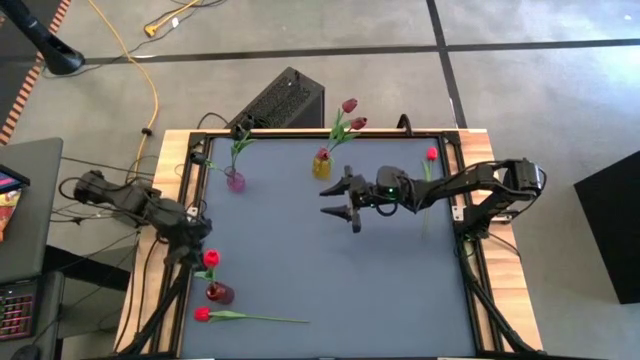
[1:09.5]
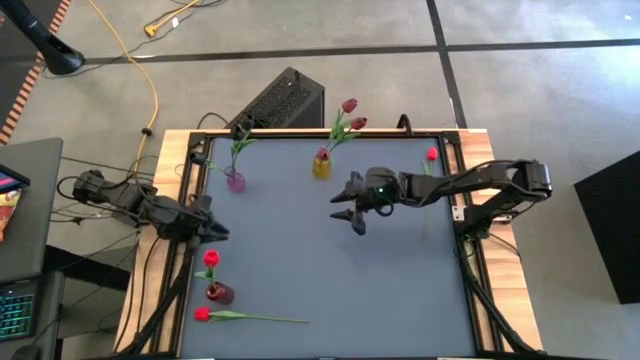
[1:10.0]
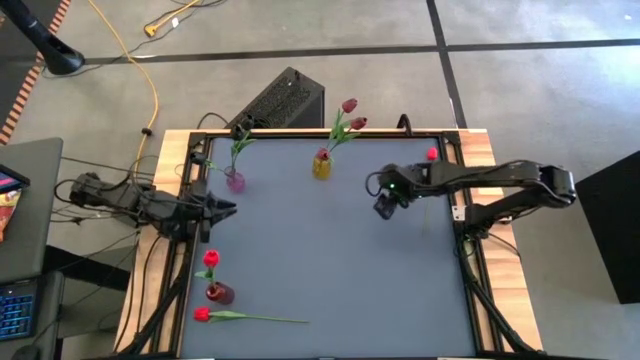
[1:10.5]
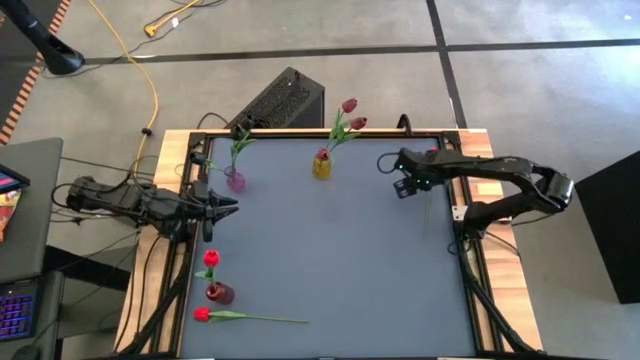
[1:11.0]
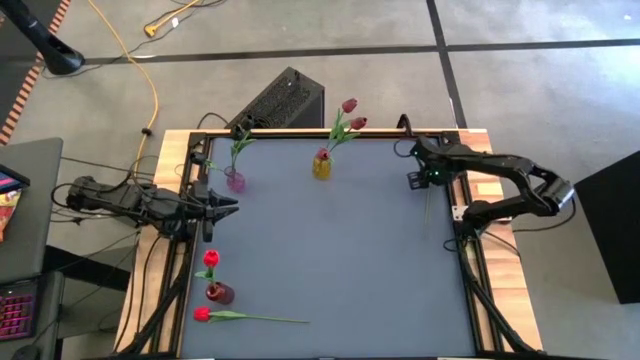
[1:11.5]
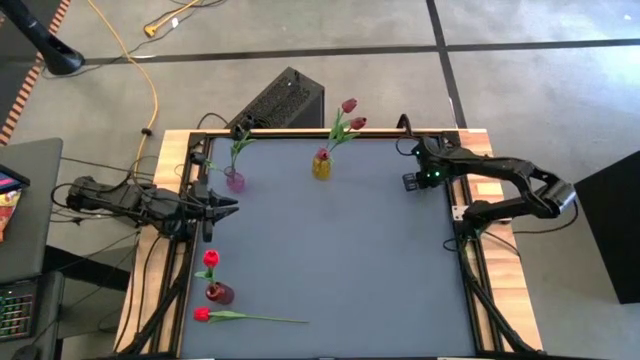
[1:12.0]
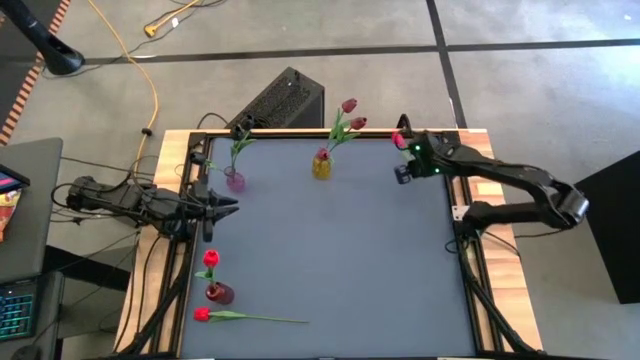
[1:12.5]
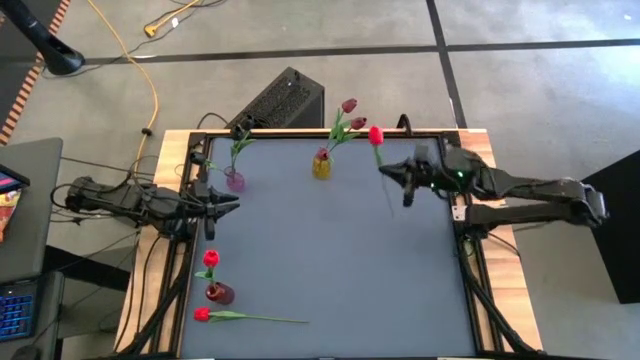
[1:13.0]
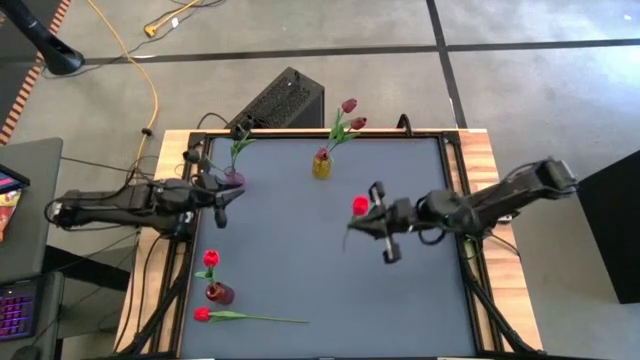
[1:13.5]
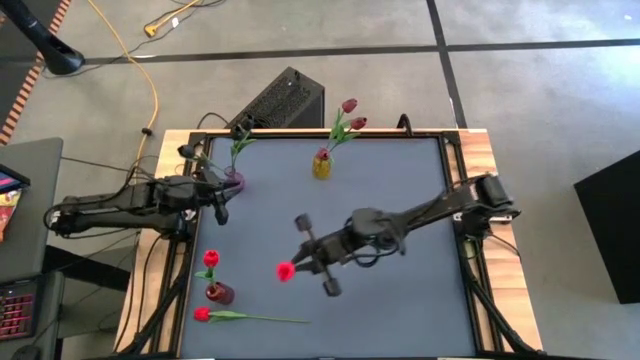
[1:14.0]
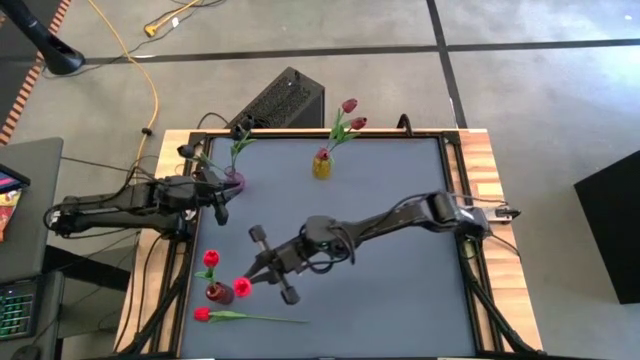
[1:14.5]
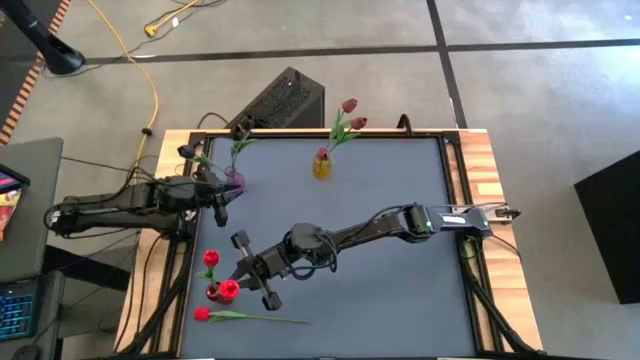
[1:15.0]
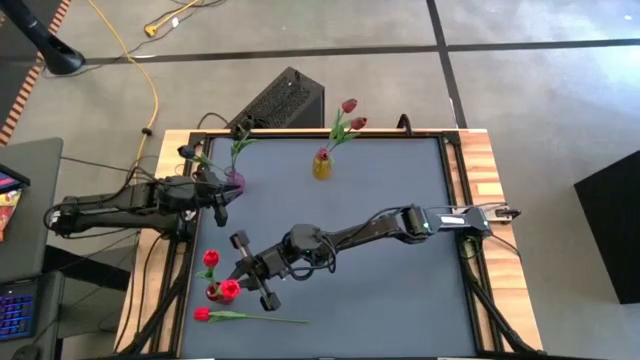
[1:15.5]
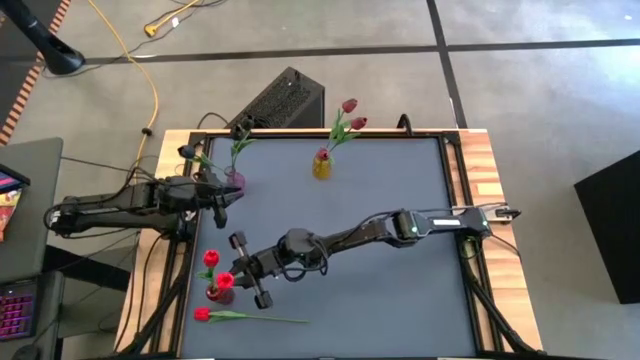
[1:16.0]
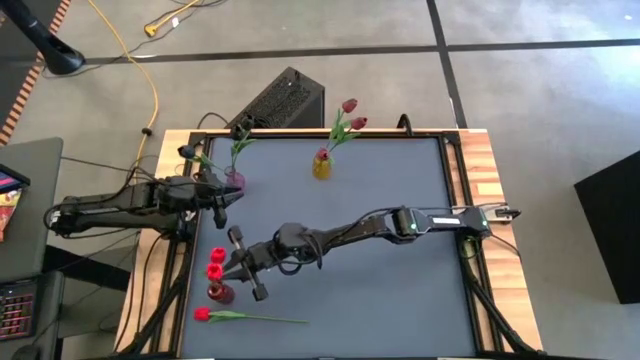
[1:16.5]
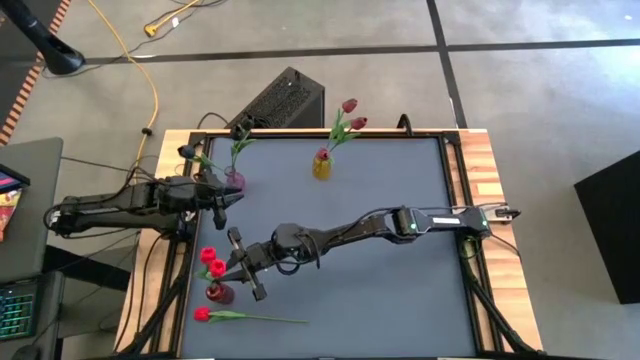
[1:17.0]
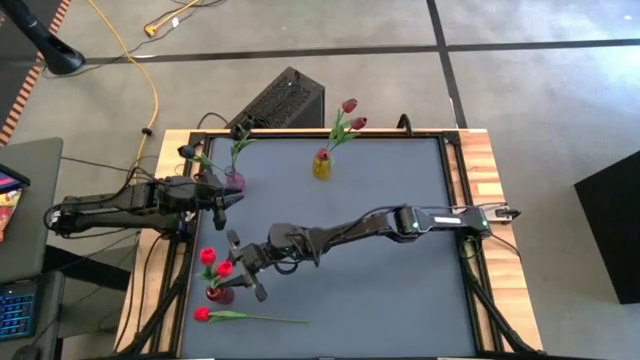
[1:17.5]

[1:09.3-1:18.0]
Task: Sort flowers into vase by color
Put the top red flower into the red vase

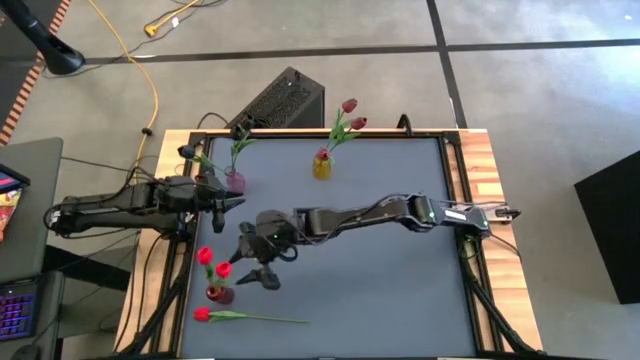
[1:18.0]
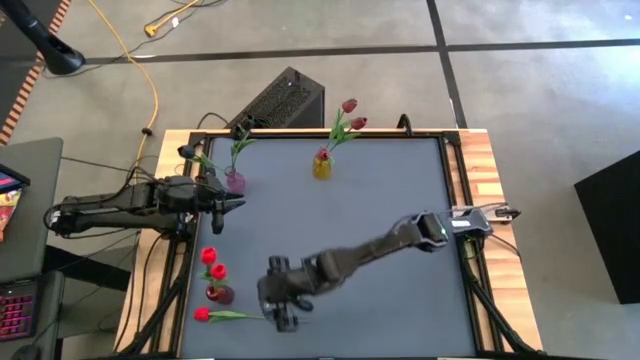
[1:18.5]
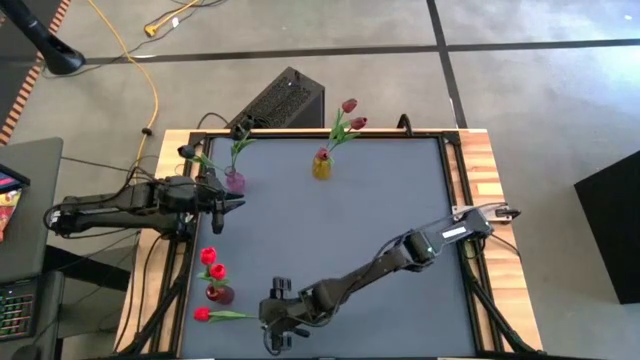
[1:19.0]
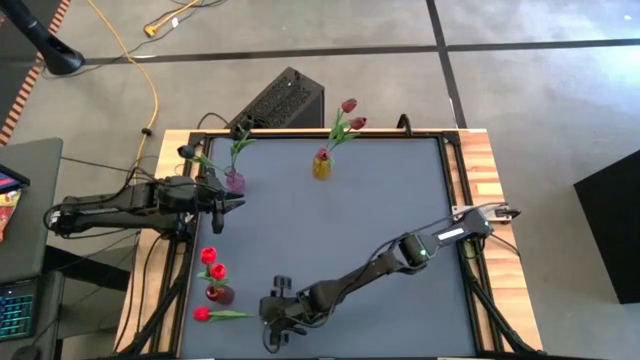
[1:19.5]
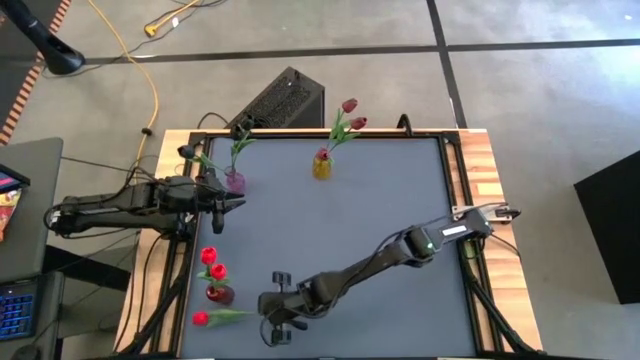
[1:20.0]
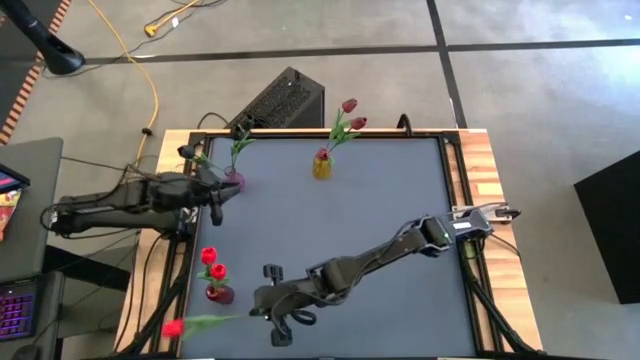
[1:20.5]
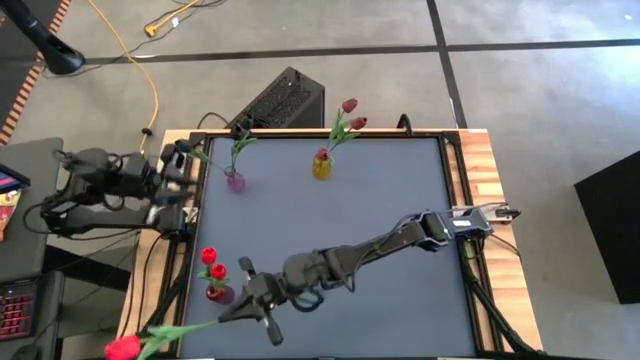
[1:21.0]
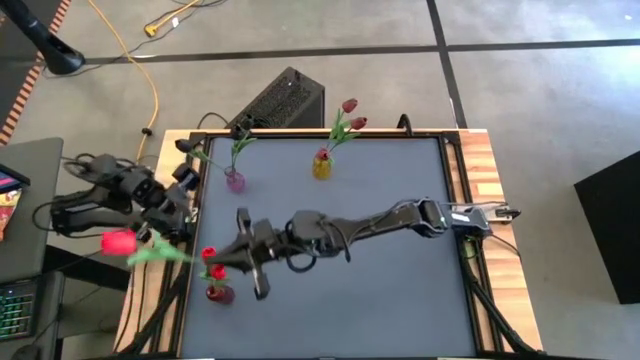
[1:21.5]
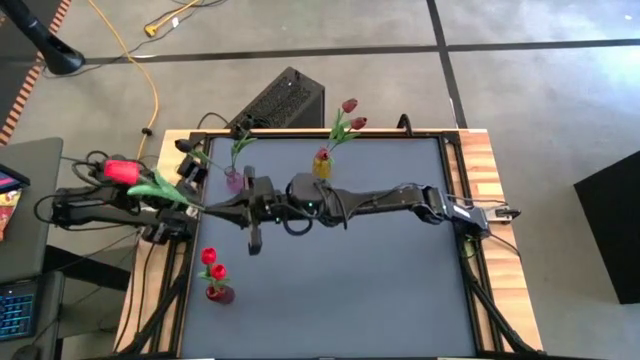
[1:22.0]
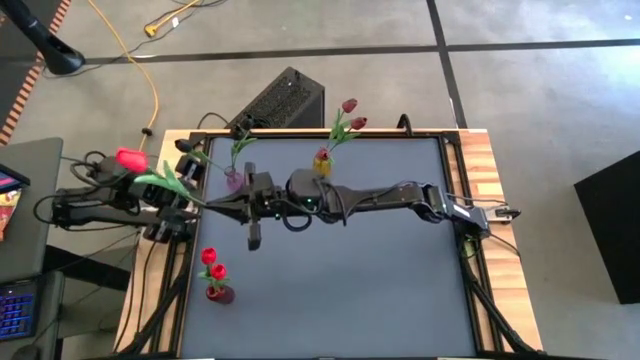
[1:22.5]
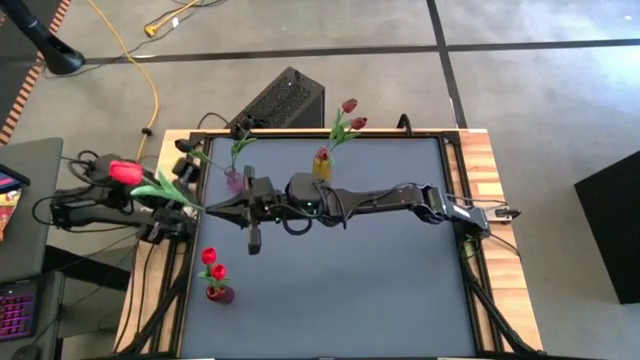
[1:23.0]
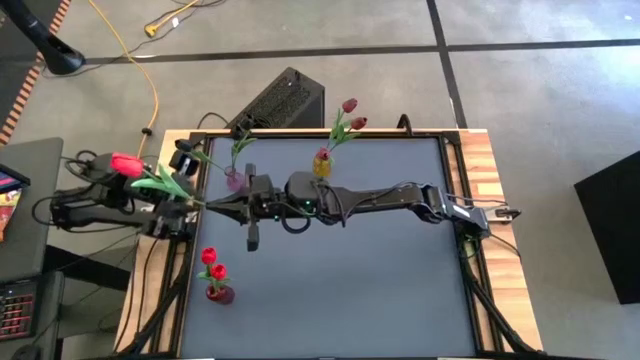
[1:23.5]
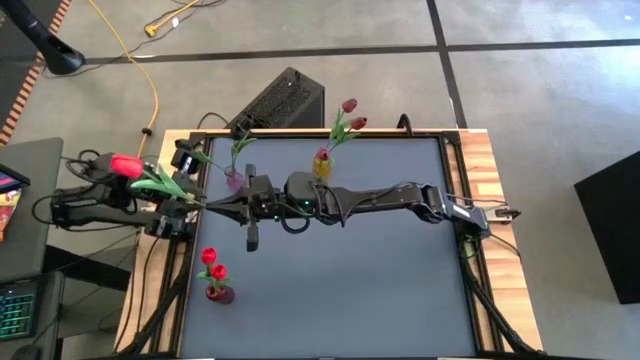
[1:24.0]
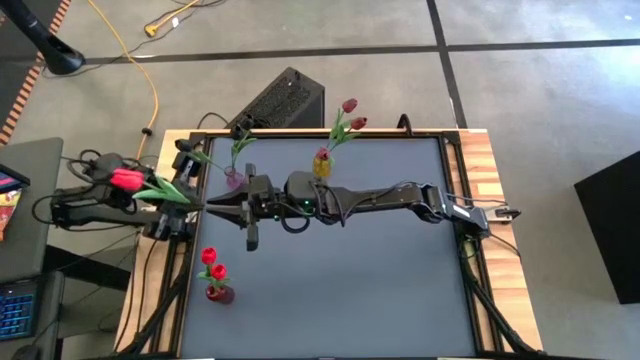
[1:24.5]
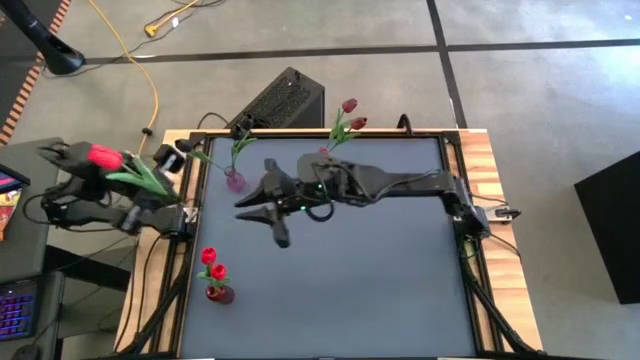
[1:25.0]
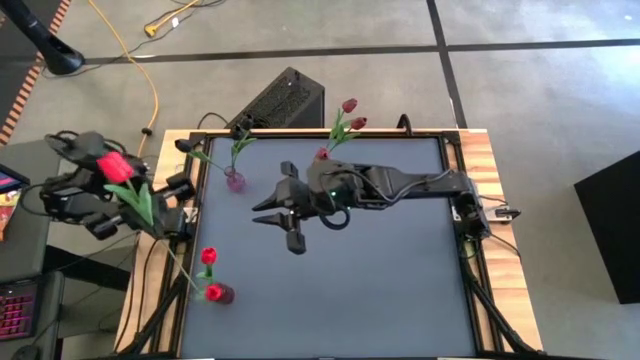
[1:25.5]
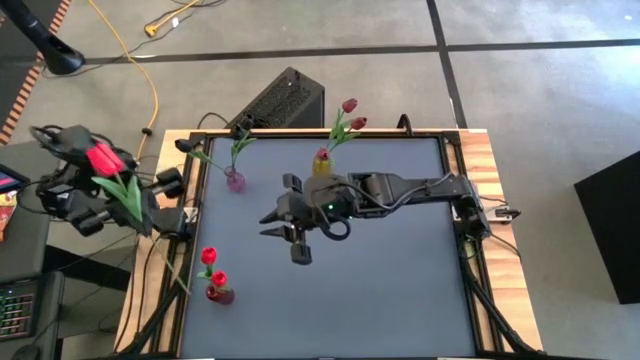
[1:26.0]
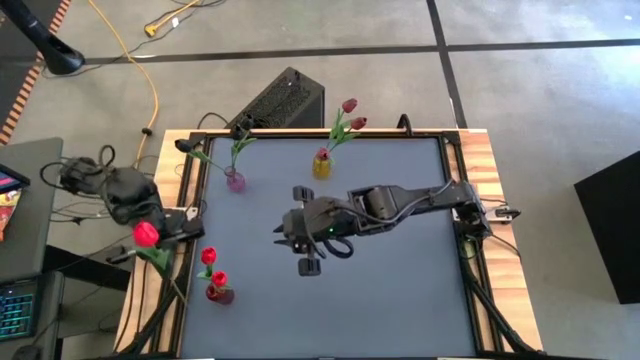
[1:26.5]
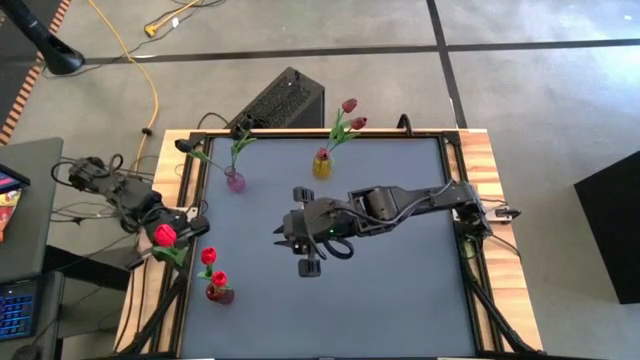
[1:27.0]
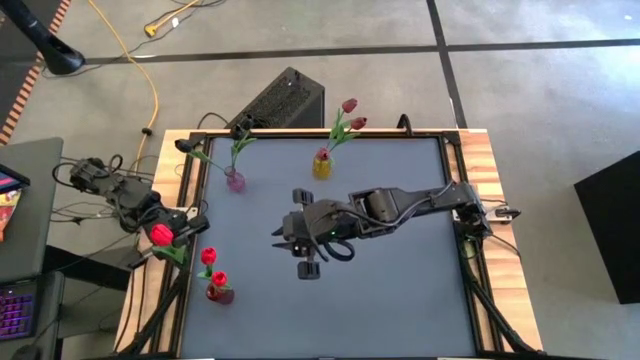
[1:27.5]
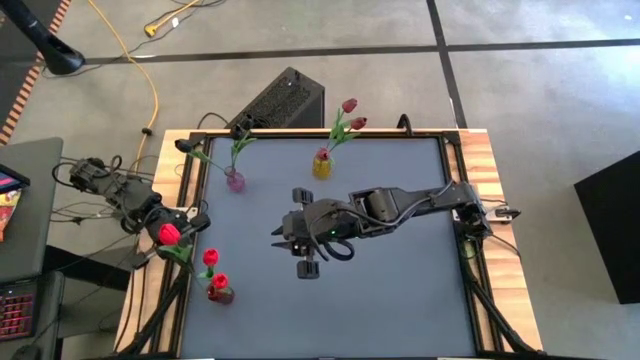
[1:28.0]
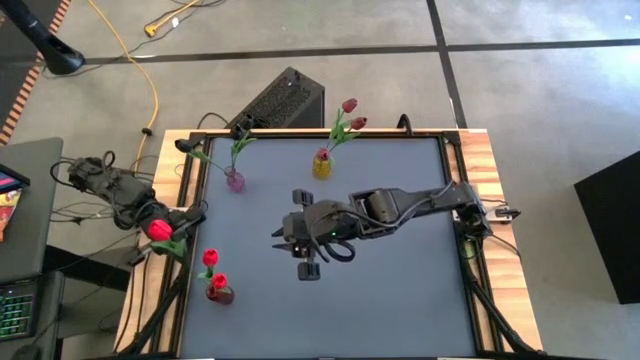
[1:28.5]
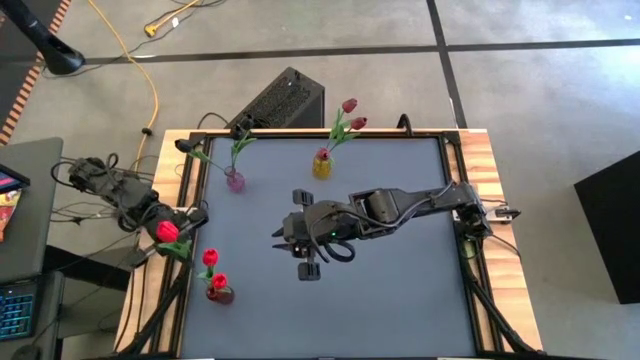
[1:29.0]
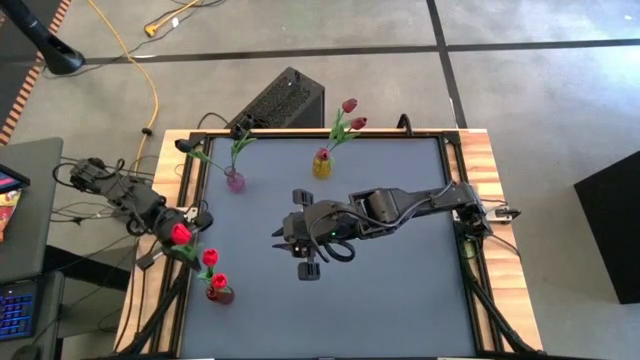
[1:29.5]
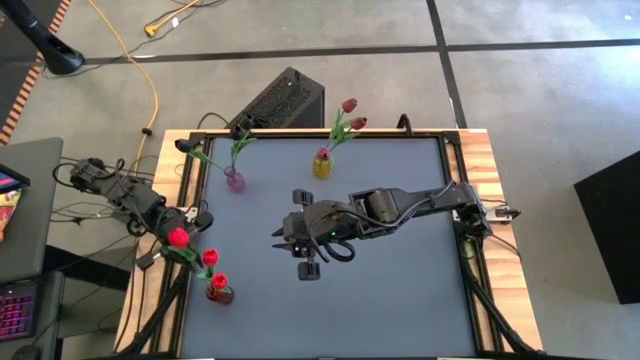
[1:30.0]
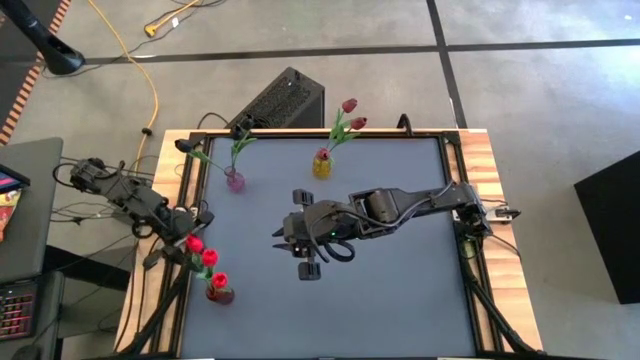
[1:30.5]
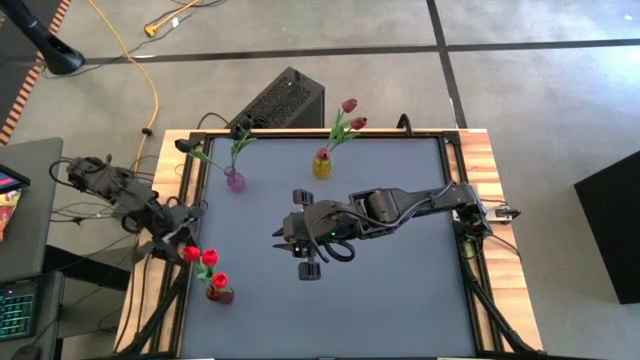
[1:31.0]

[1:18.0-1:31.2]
Put the red flower into the red vase
